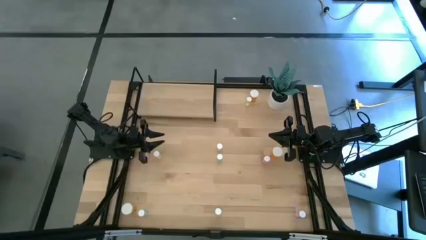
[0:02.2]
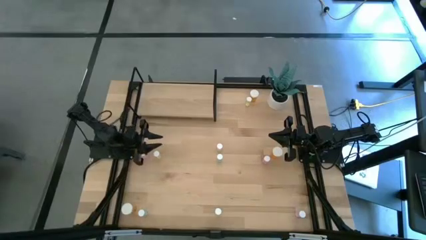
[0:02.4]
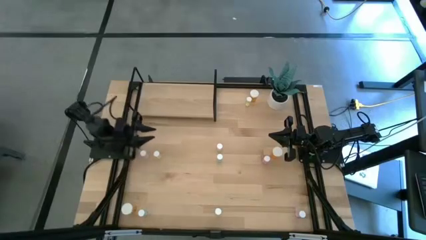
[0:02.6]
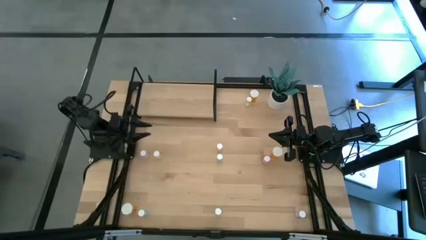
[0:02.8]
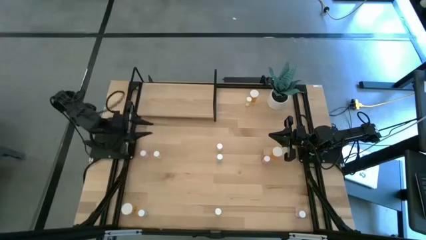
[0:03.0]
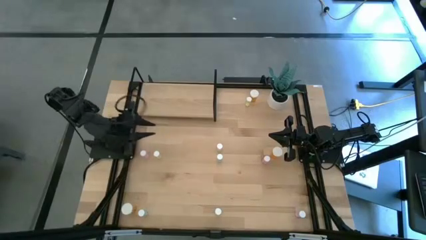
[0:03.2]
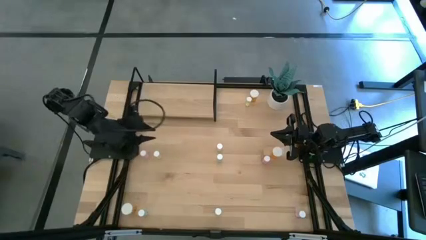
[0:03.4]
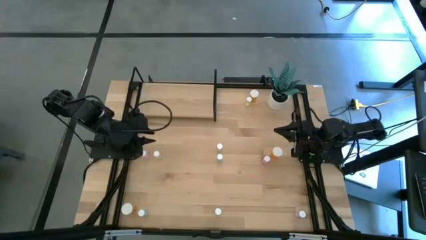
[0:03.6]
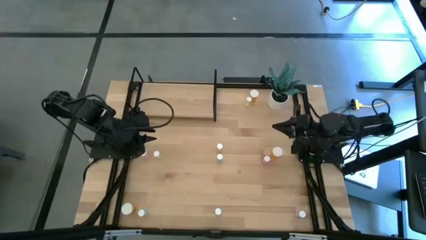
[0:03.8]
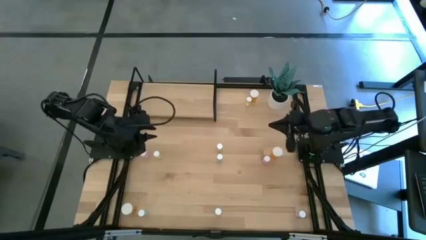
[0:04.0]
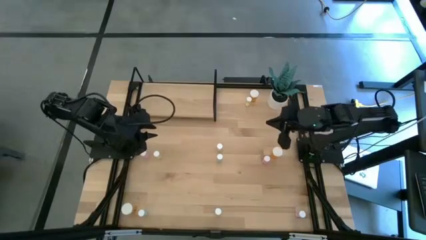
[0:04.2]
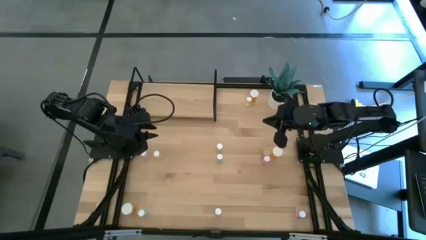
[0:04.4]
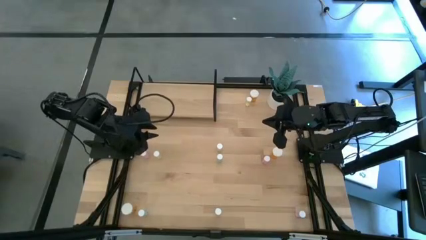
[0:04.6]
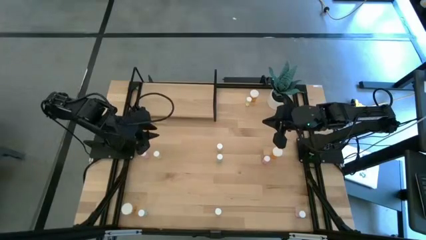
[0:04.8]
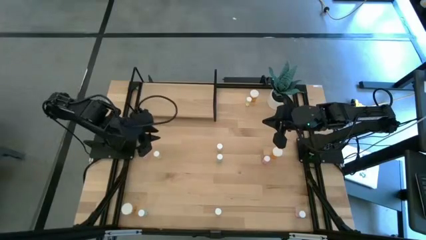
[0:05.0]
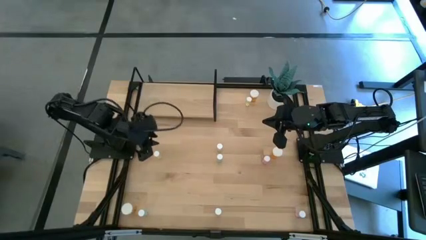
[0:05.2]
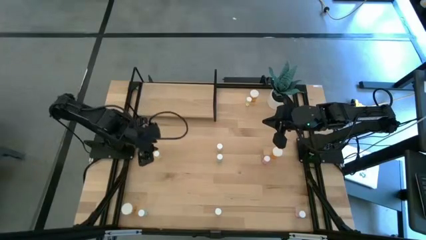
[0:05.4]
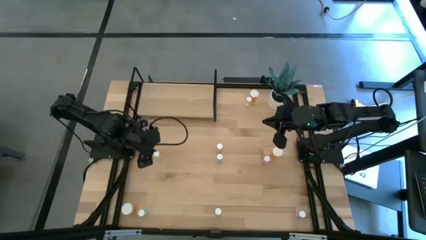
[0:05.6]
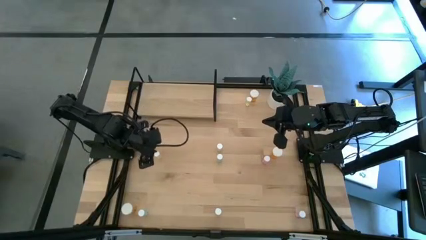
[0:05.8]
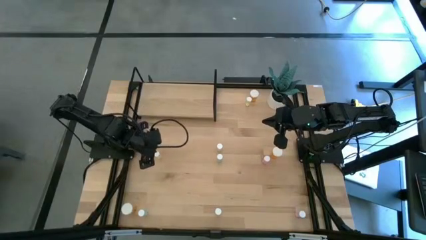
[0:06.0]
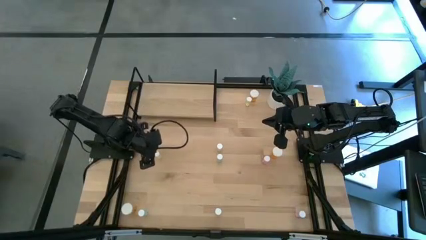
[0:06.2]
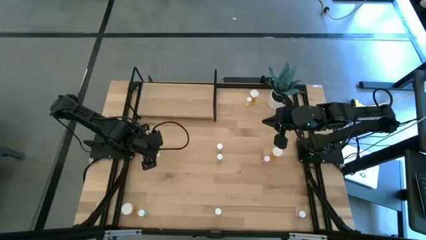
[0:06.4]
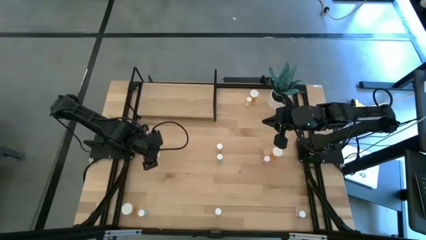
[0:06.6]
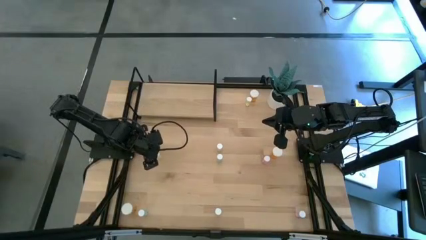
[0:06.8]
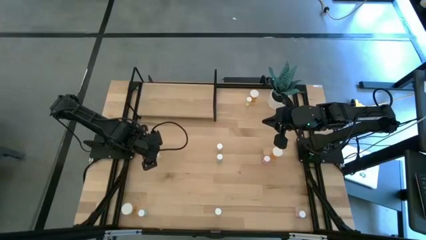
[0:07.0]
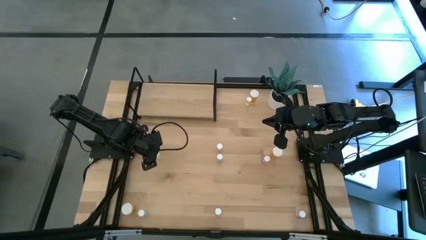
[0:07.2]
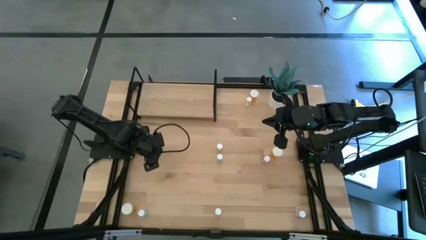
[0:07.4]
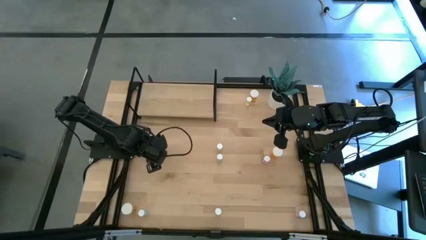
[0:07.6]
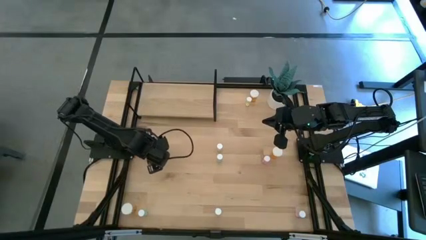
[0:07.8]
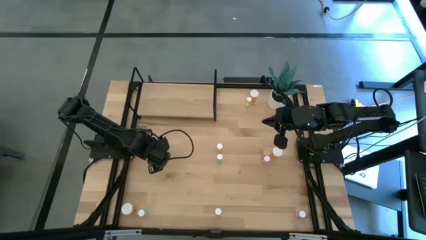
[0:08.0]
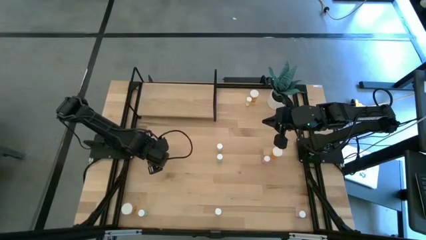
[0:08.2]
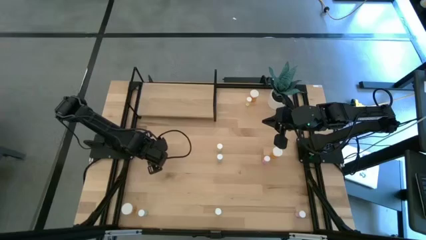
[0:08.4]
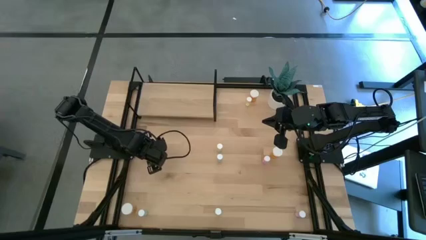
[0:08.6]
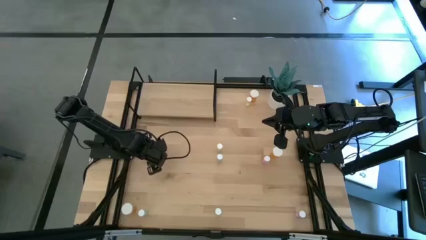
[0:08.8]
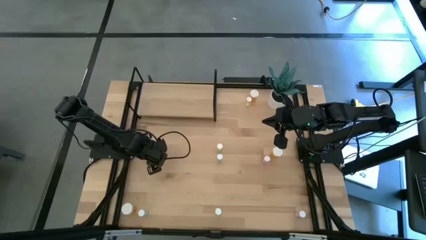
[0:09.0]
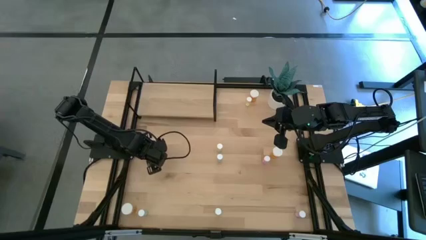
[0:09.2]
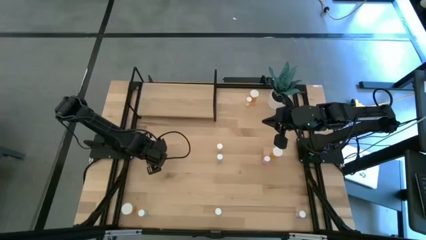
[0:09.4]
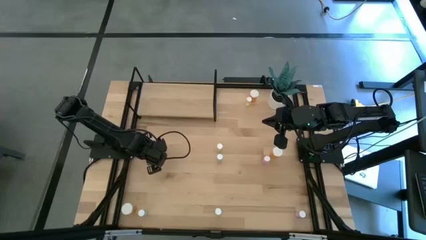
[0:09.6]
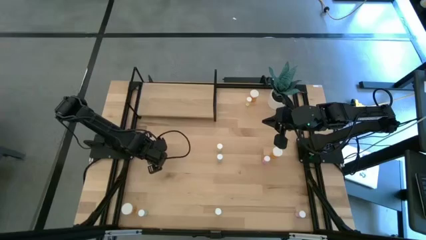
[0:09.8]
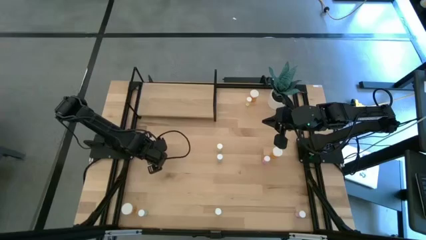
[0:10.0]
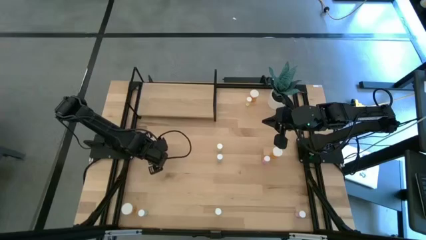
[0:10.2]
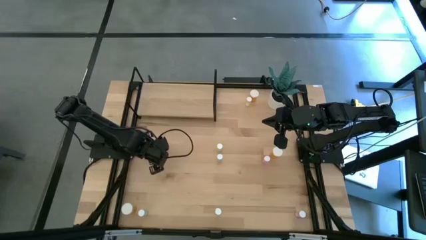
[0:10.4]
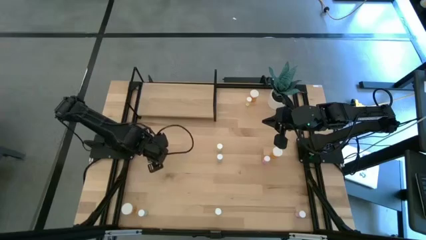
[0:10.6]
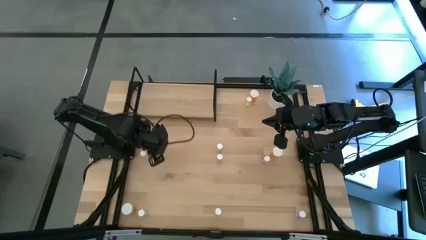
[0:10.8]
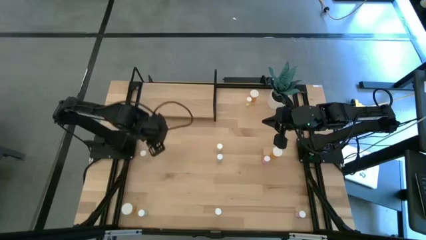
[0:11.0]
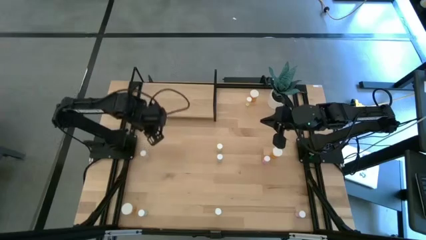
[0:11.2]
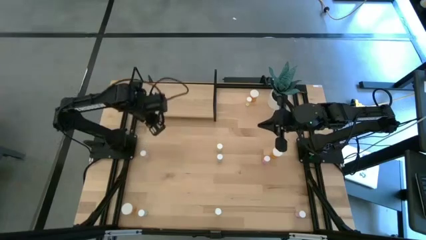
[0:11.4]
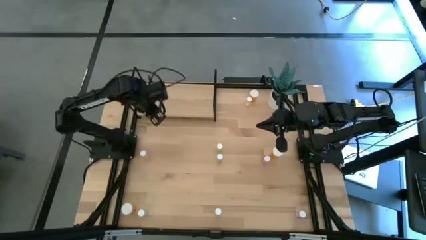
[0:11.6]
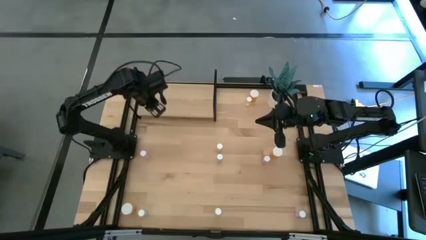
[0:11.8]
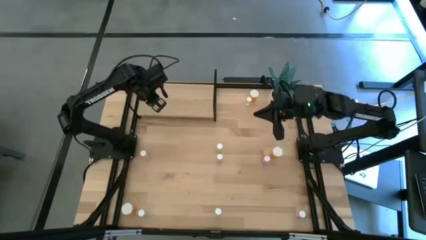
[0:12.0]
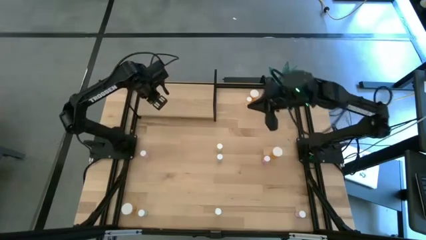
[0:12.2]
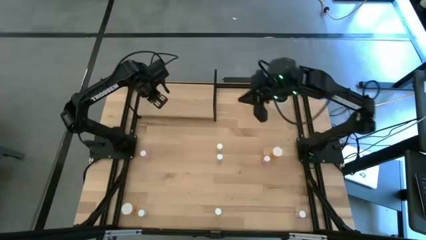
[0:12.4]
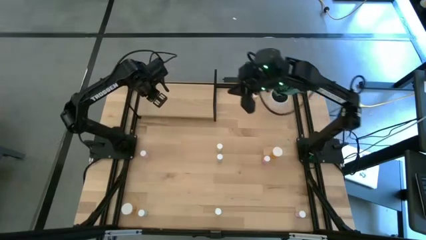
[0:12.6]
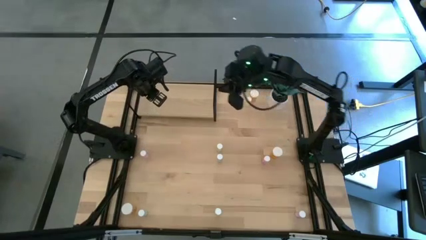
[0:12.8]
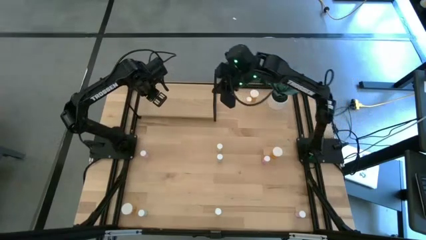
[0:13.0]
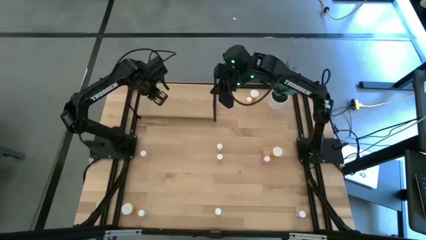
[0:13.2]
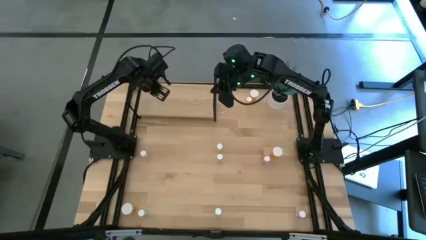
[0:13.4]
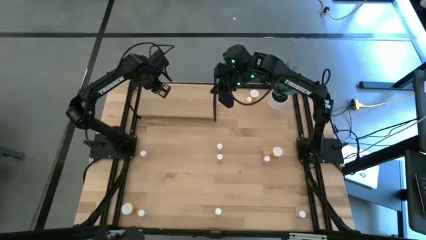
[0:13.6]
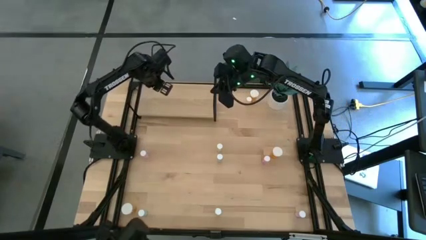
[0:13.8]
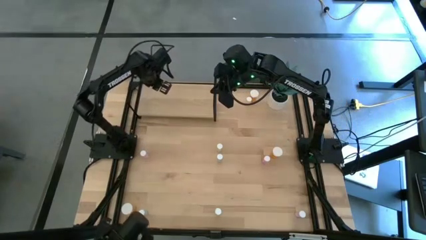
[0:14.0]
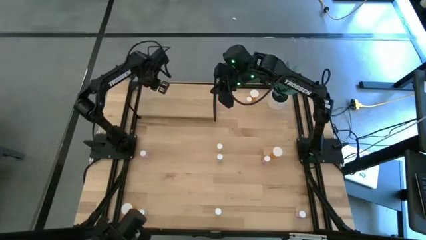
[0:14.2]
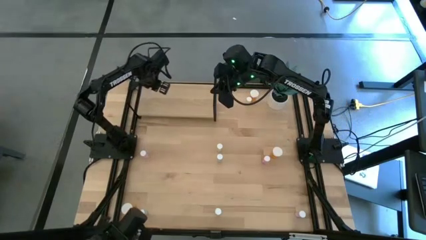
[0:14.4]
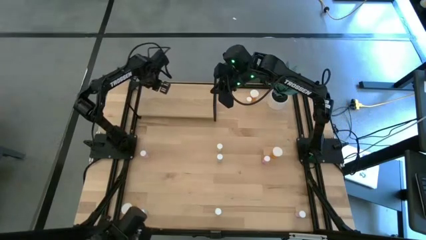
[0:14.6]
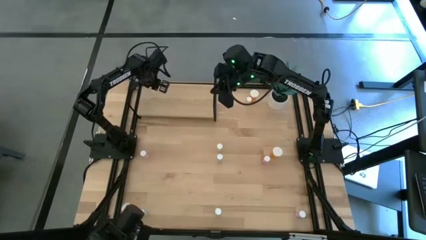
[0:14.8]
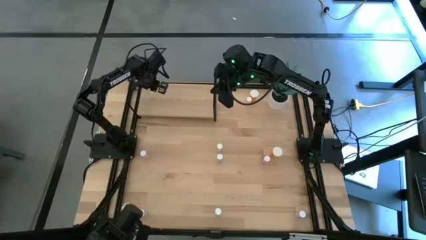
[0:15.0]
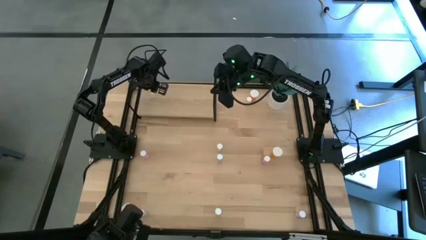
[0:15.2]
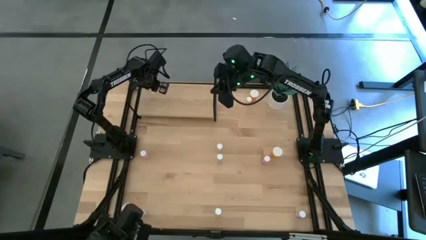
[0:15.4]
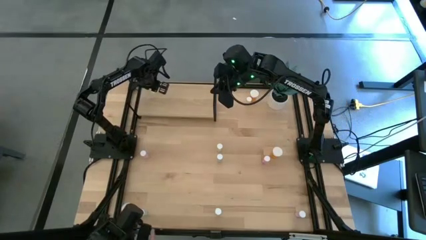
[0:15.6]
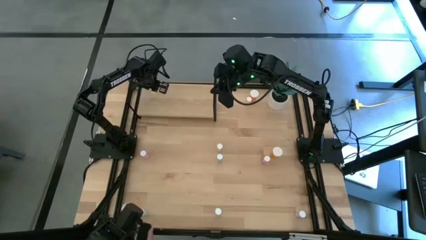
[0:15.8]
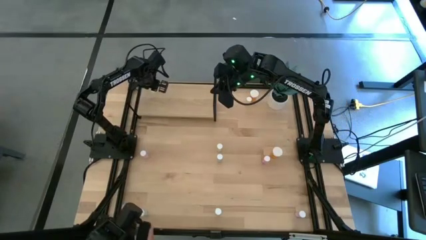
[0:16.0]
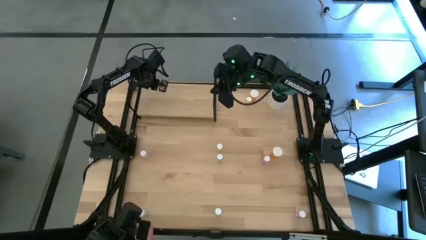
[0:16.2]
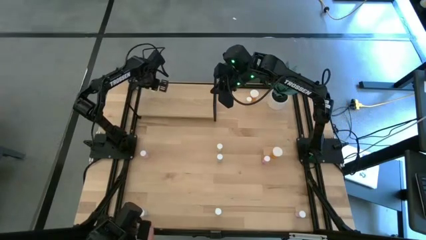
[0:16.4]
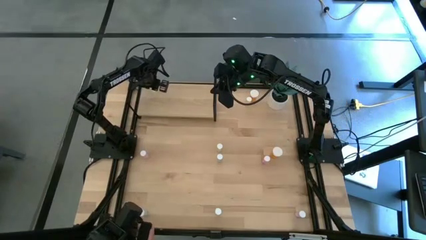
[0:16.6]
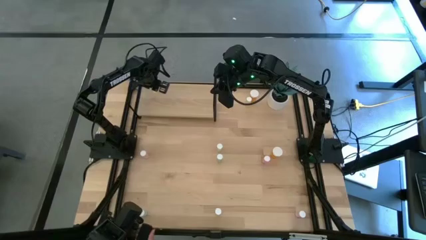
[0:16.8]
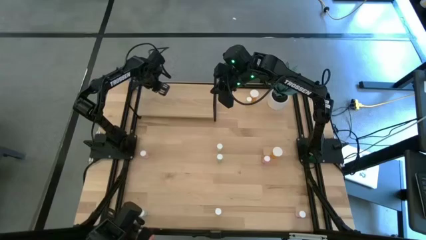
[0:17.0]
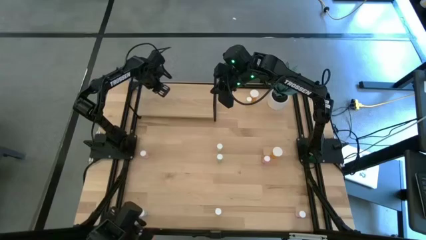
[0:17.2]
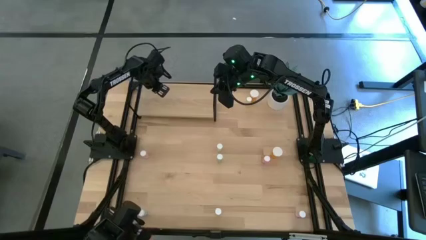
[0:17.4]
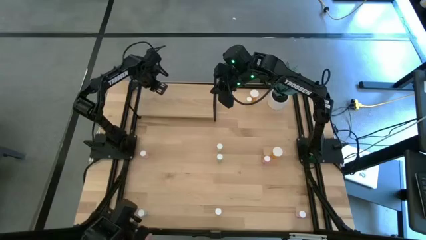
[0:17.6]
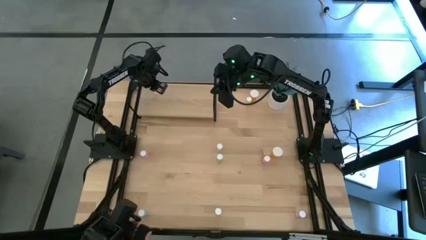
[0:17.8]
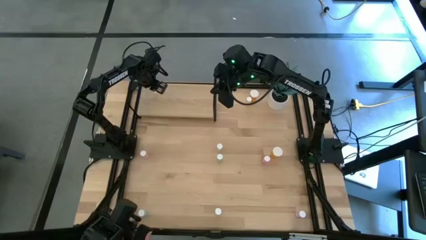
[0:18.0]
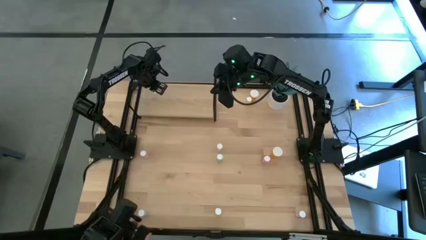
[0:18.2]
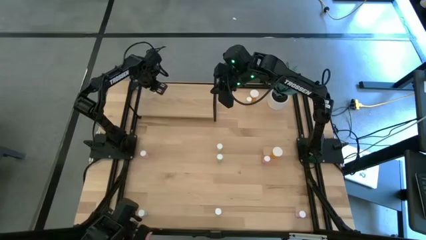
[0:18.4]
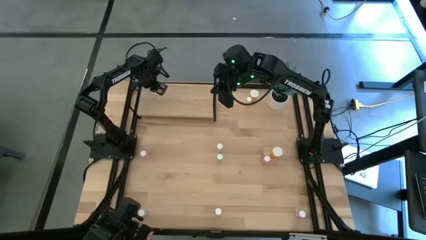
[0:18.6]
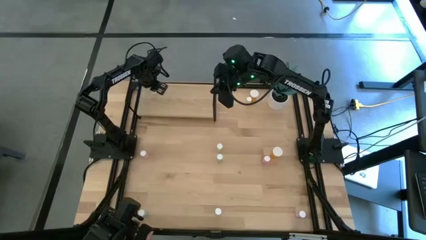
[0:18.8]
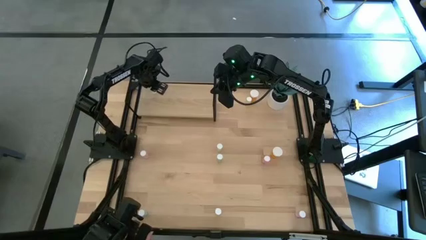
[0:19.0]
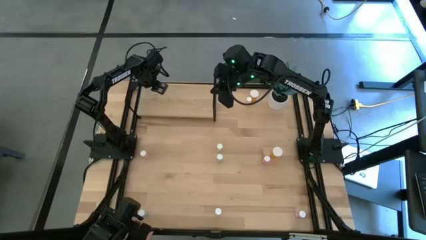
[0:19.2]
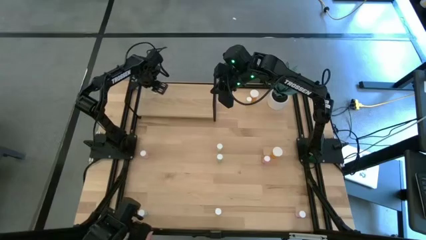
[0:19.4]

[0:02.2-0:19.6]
Task: Pick and place medicine bottles onto shelf by color
Put the bottom left yellow pill bottle on the shelf
